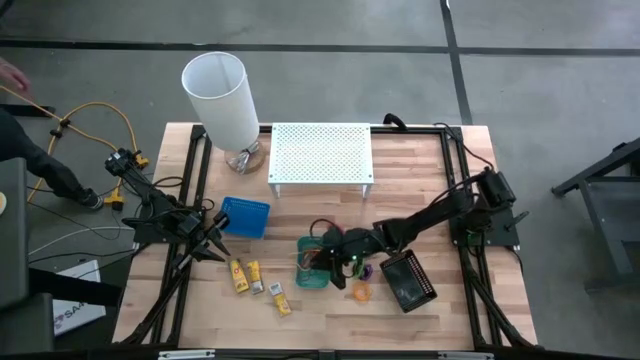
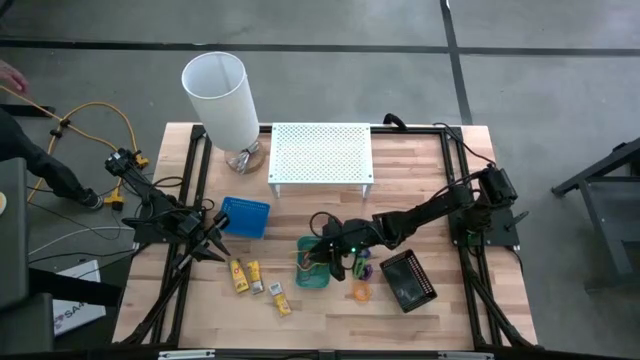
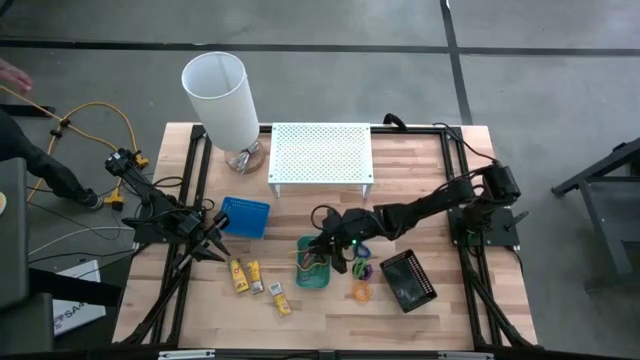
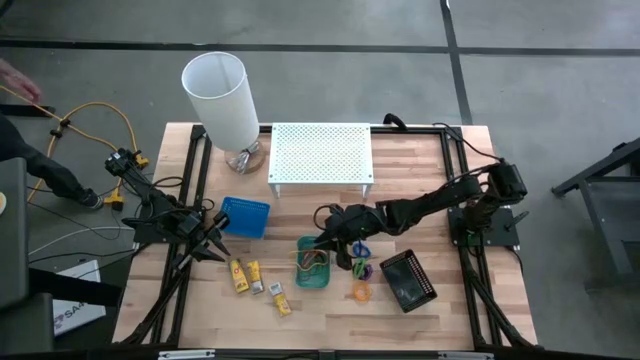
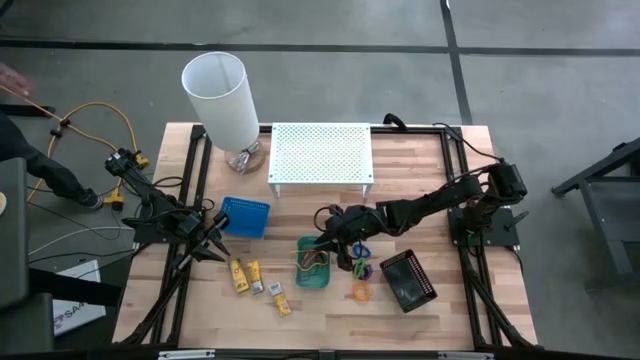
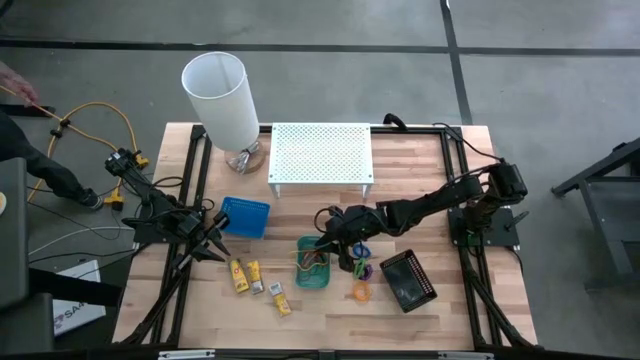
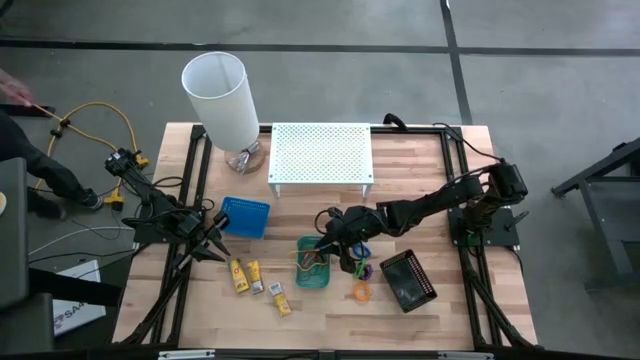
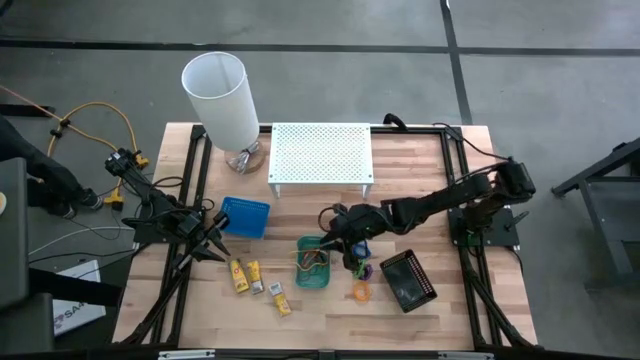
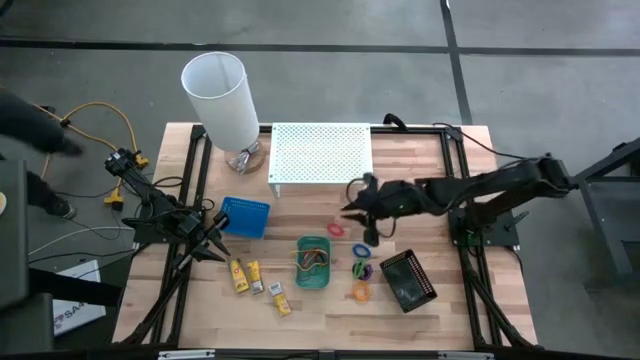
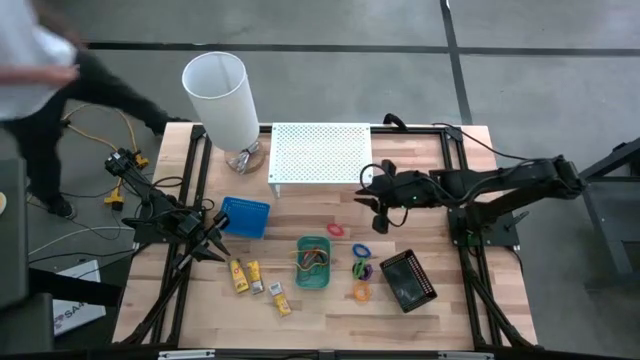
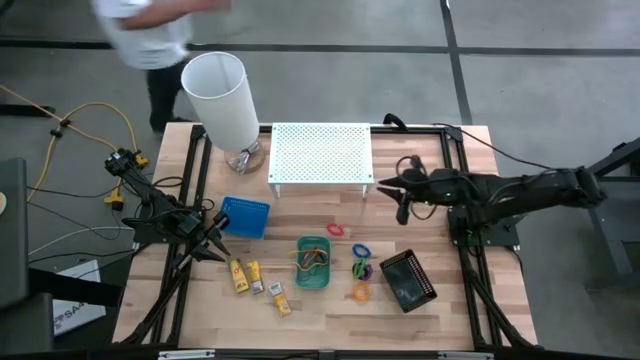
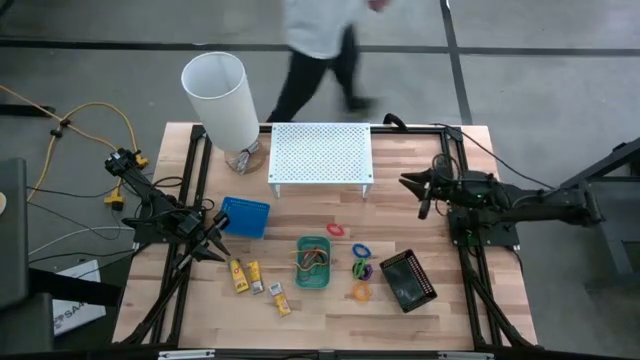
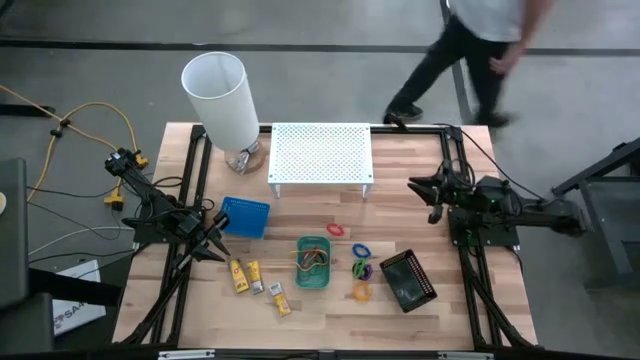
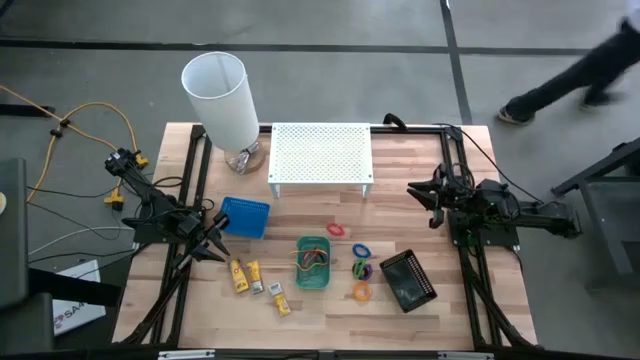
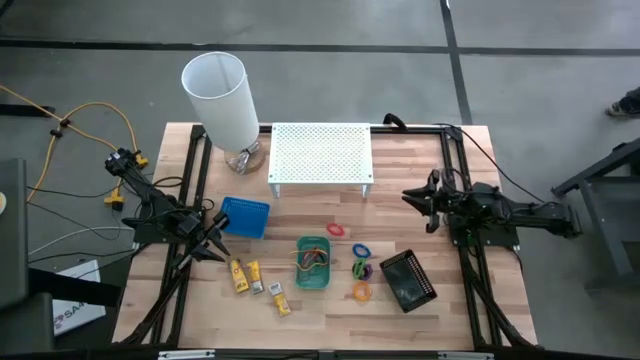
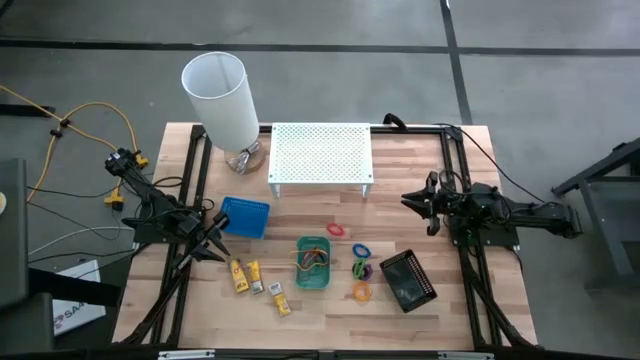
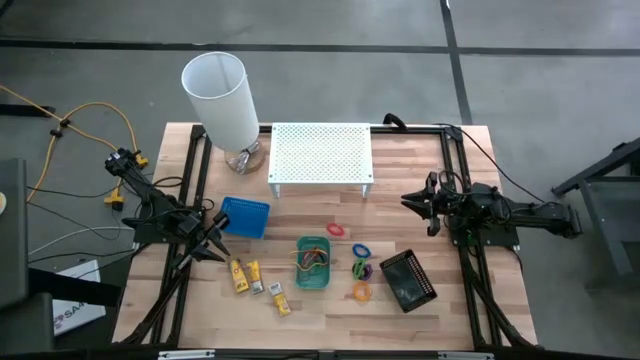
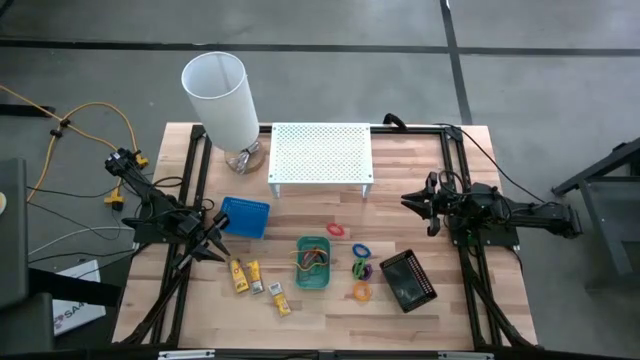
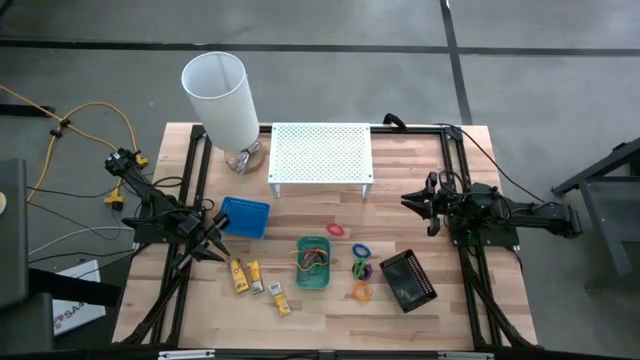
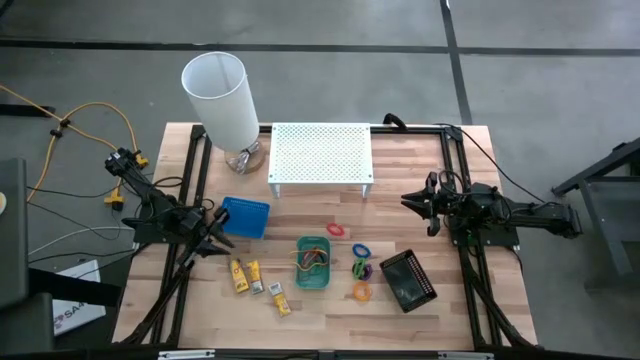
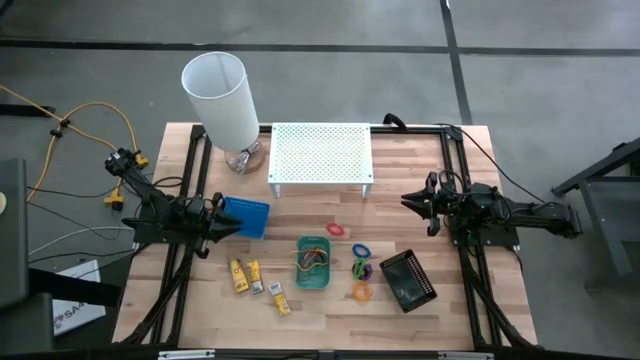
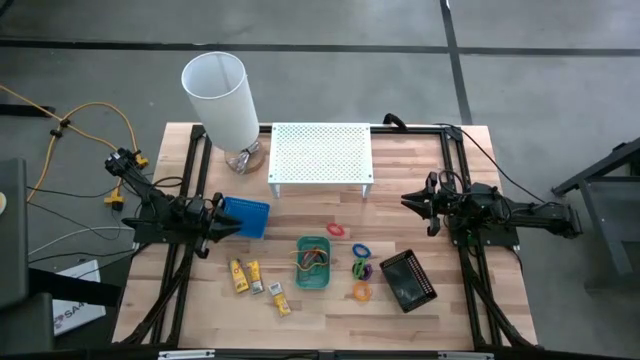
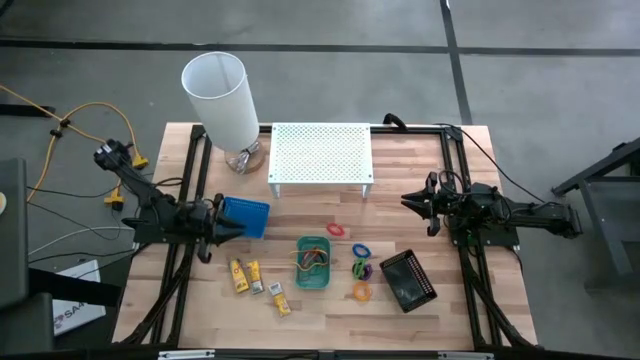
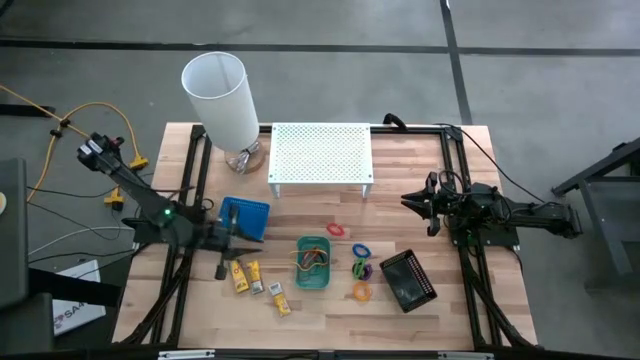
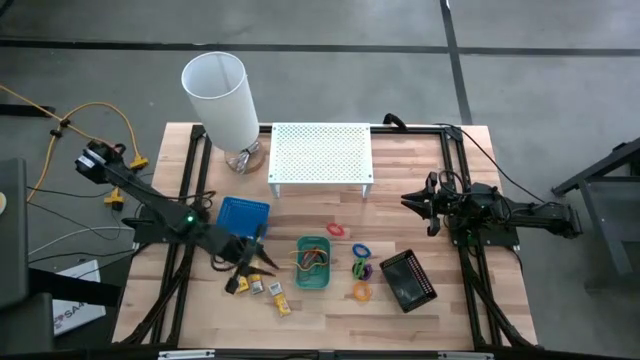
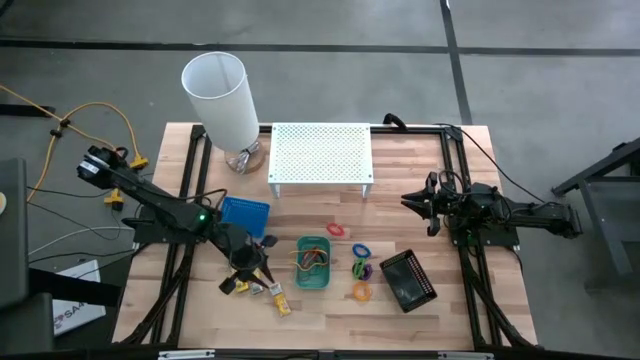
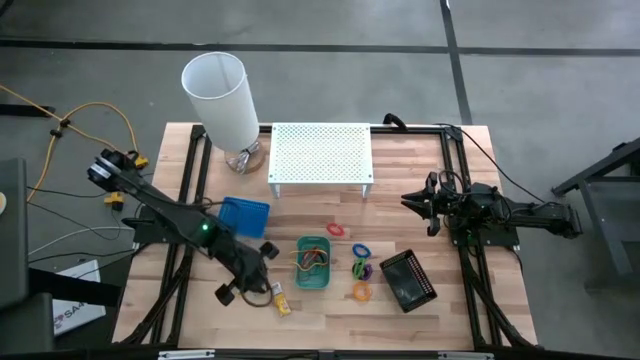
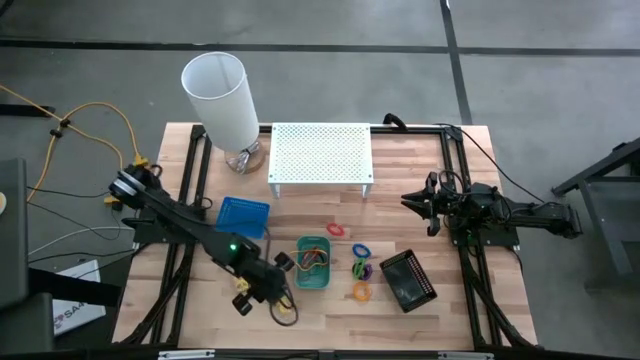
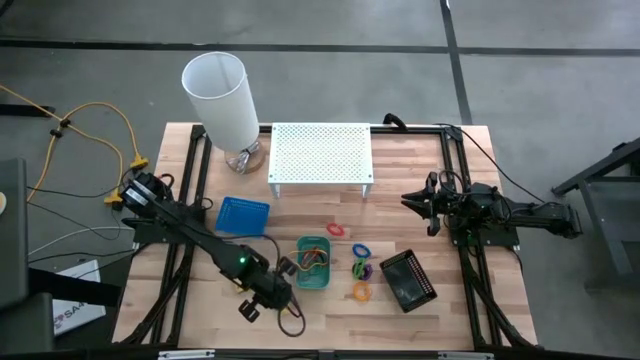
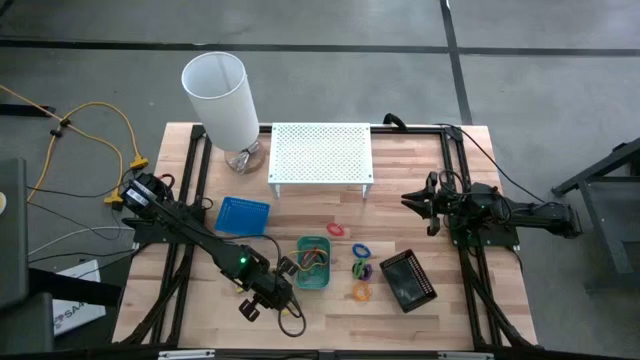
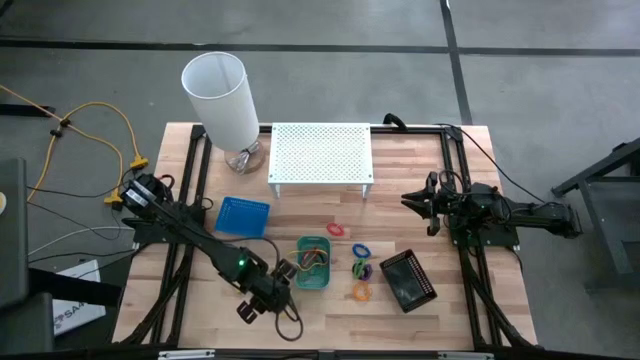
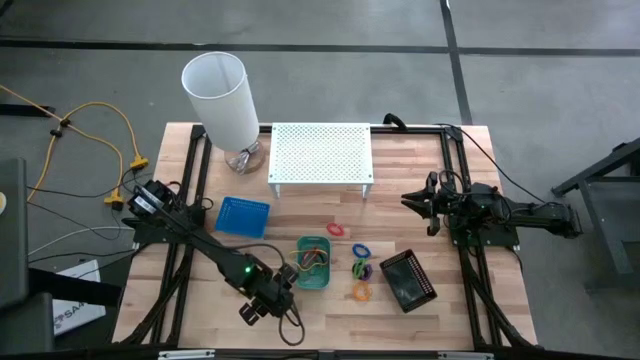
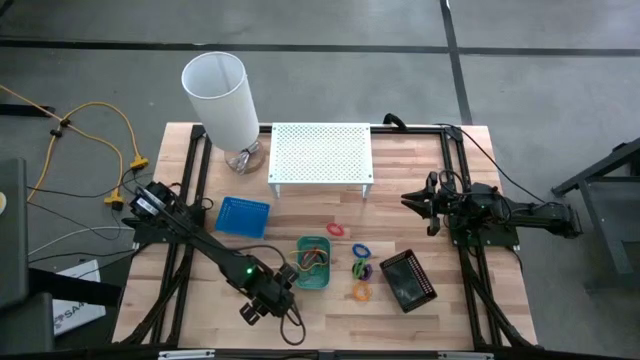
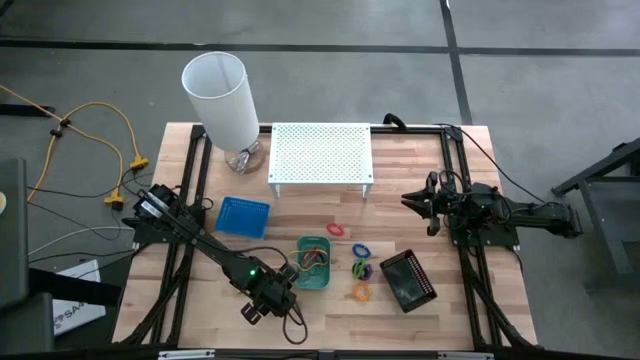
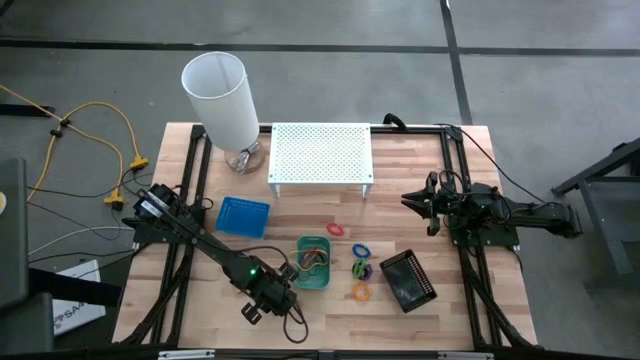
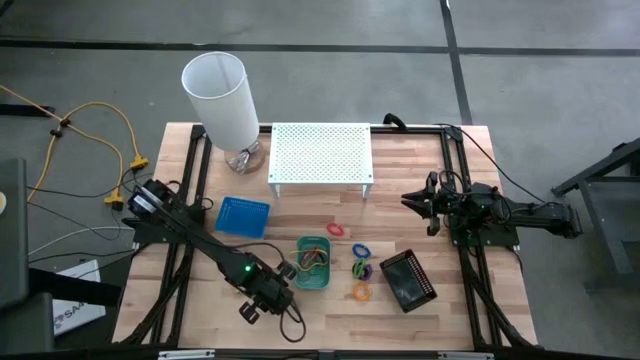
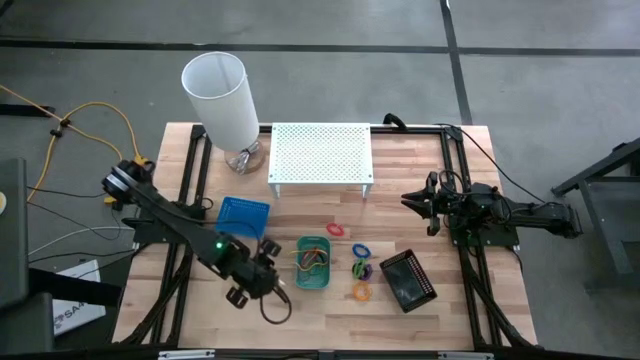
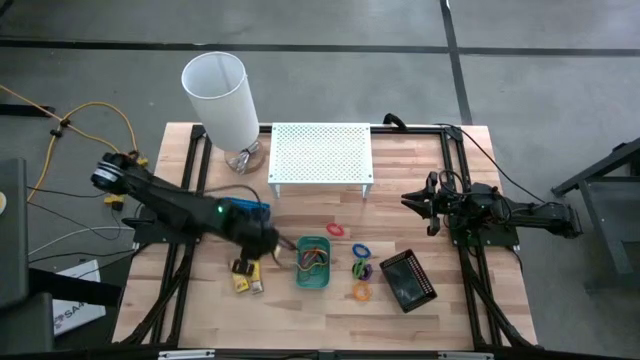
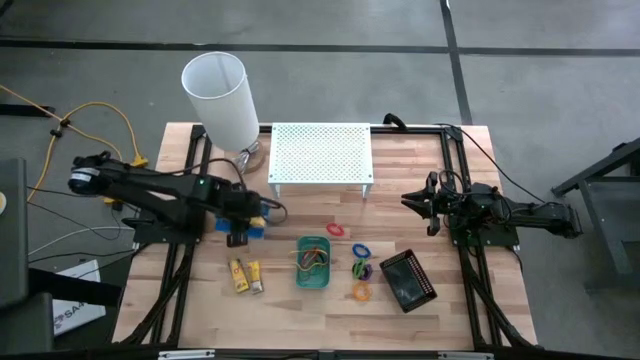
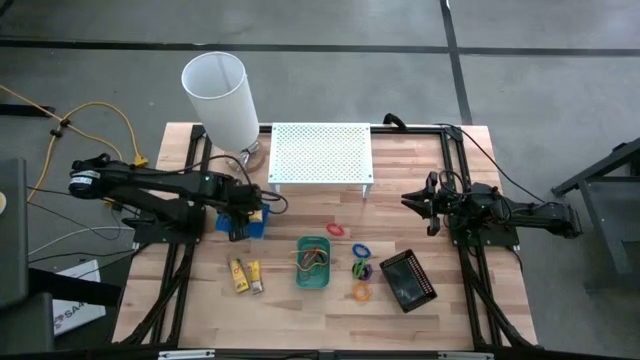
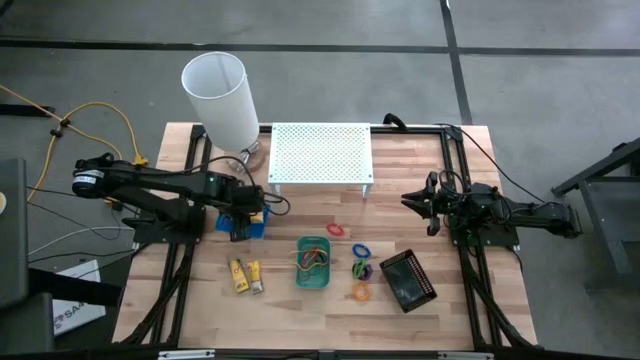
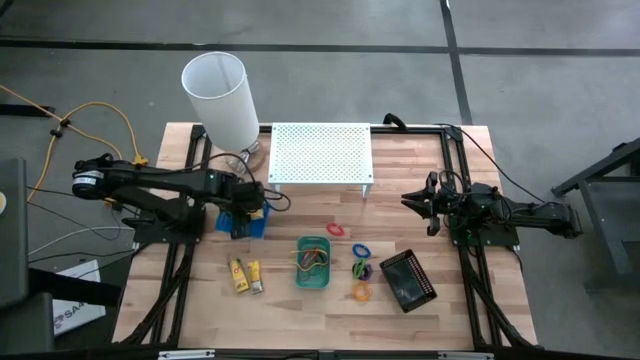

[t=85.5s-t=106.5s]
Task: Pick & Place Office Desk Supplies
Put the yellow crayon box into the blue bin
